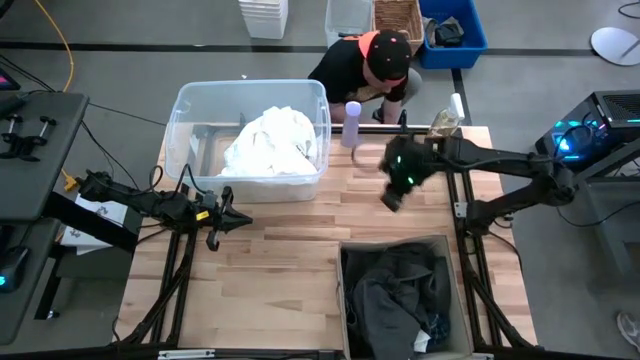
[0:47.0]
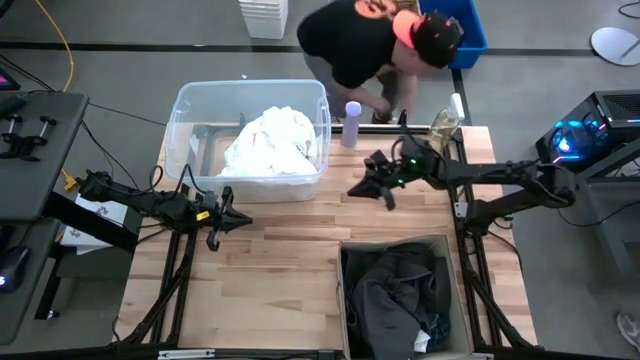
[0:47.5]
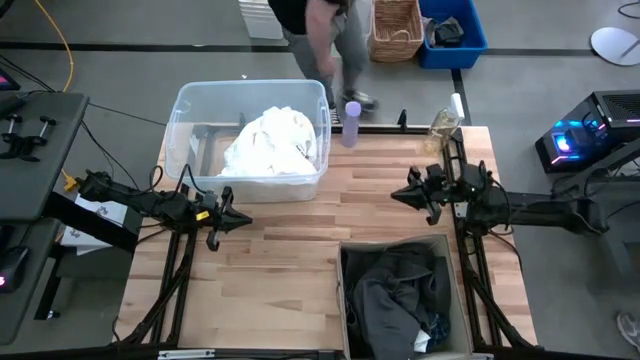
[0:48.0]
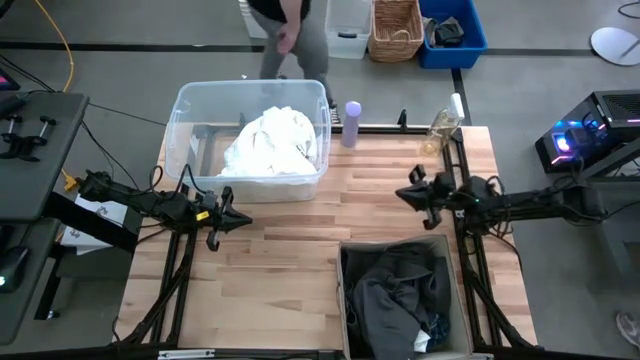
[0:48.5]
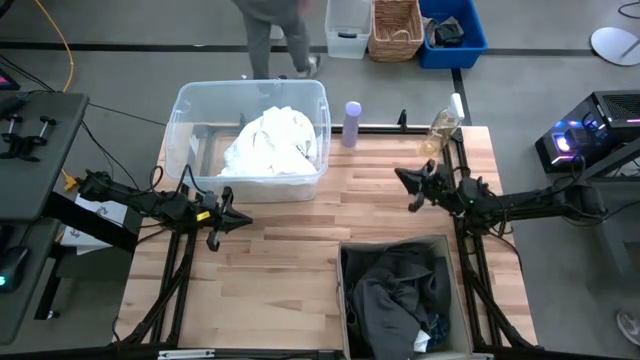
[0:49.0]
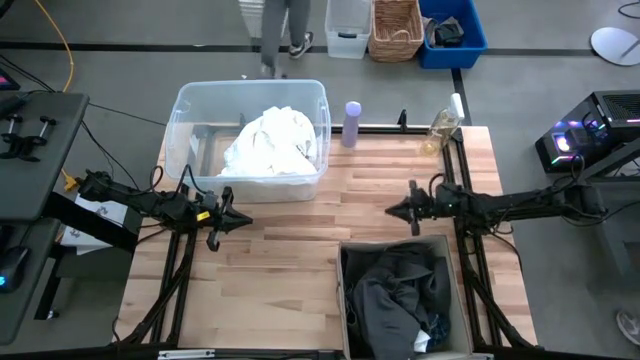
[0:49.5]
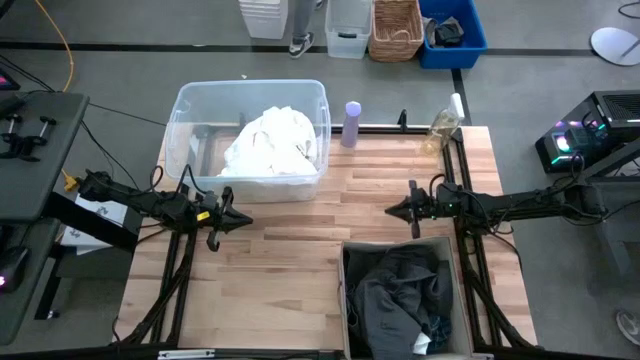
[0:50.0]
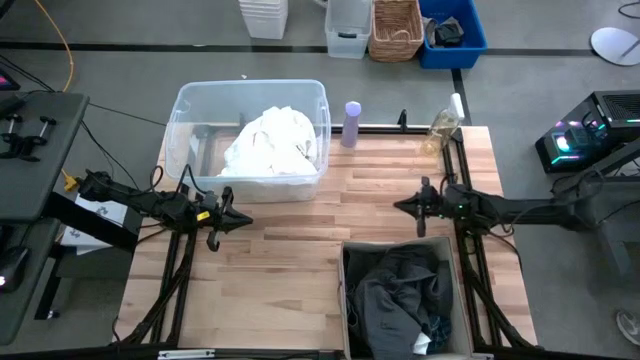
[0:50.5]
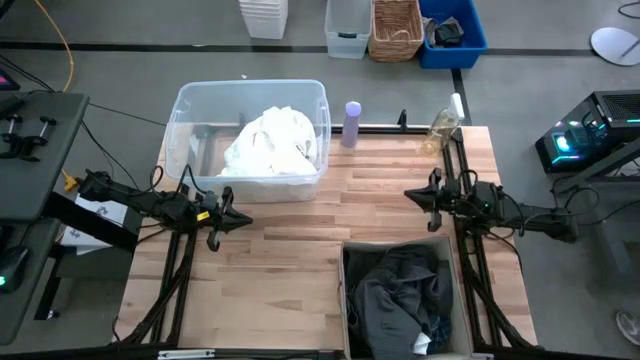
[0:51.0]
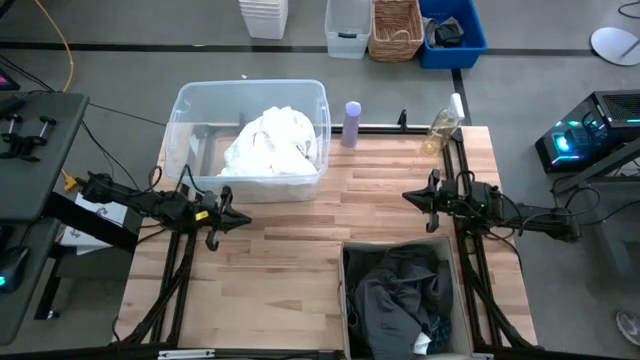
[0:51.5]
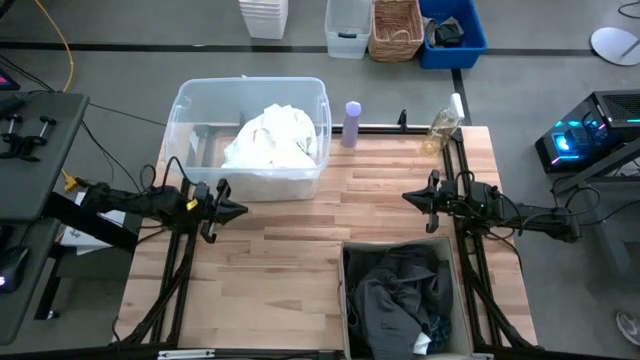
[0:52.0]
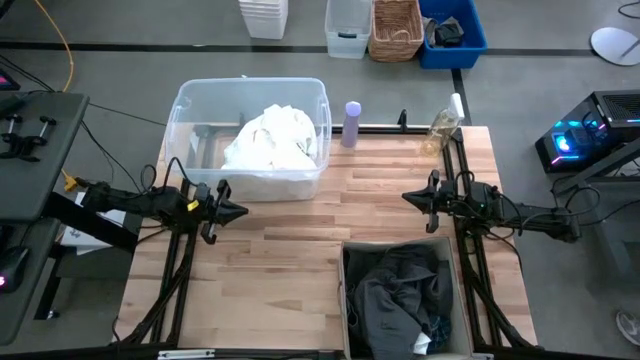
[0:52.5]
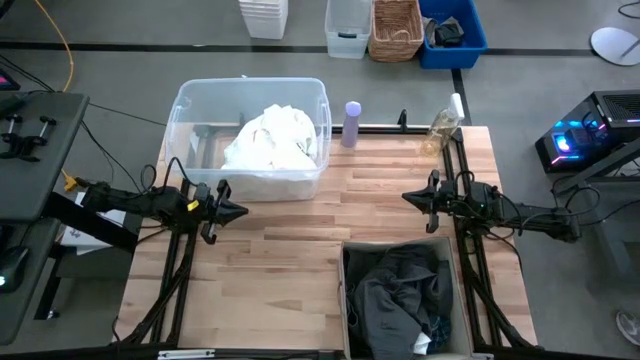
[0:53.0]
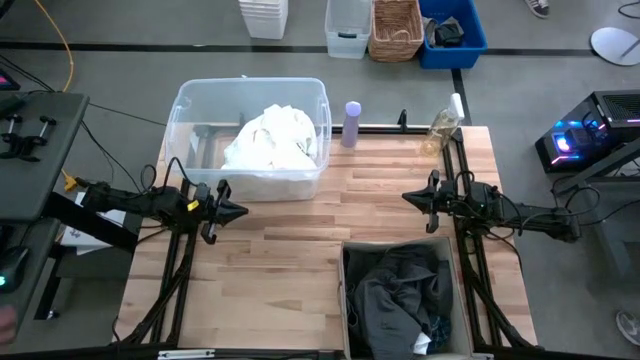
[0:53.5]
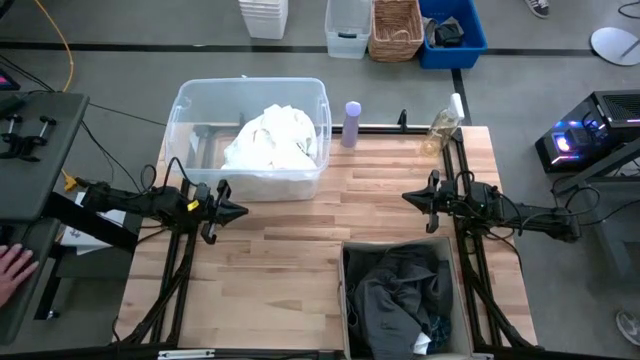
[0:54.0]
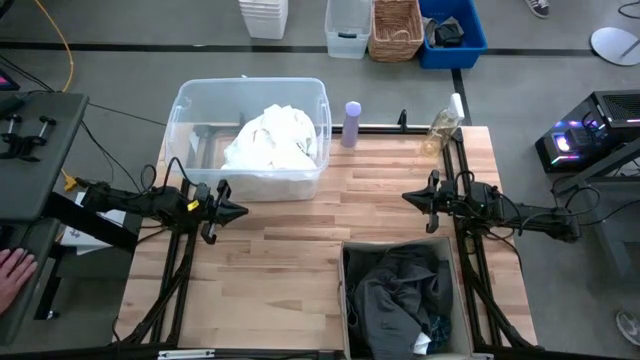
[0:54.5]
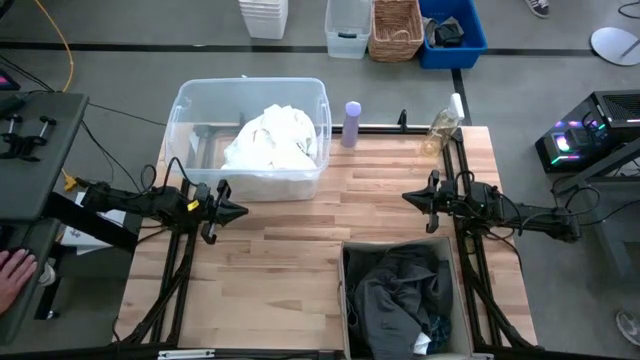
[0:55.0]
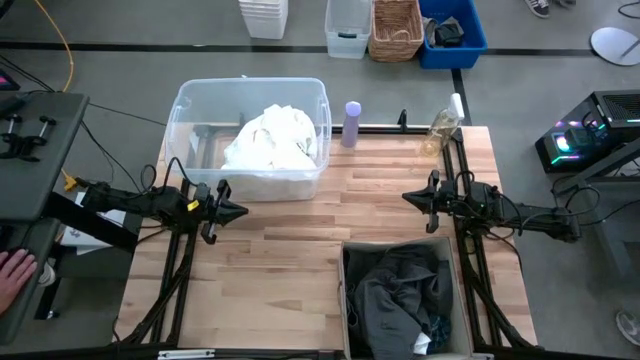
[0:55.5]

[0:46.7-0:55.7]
Task: Sort clothes
Return to Home Position

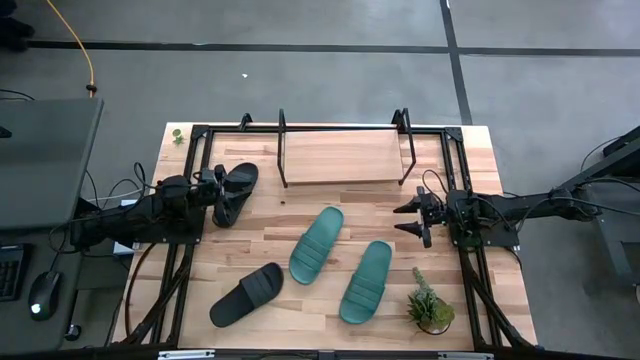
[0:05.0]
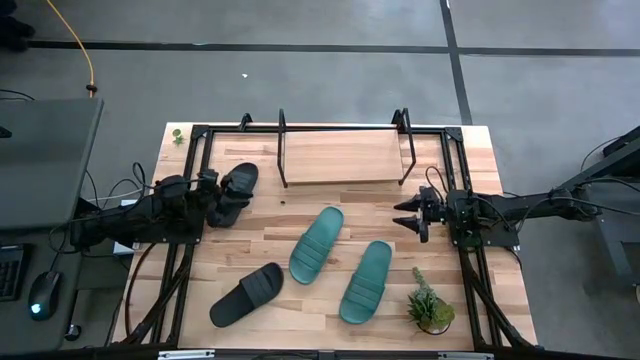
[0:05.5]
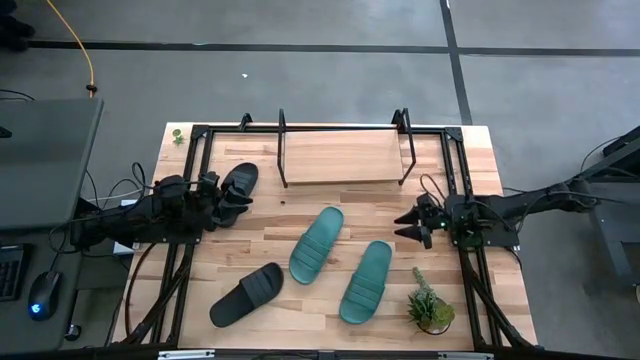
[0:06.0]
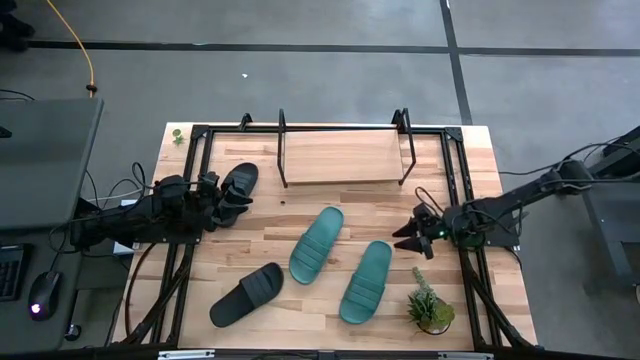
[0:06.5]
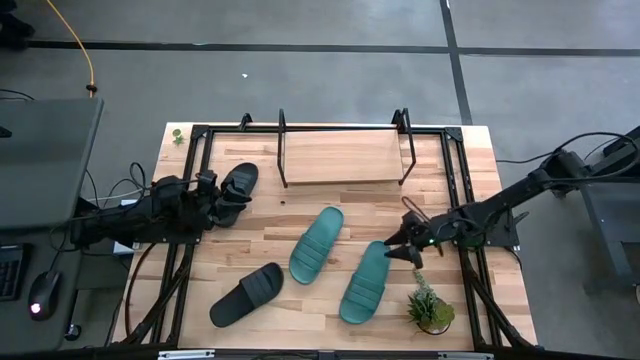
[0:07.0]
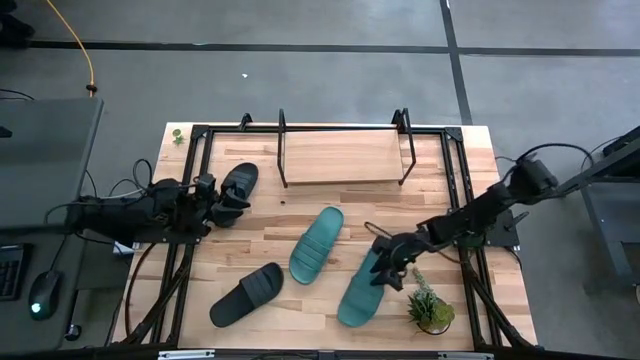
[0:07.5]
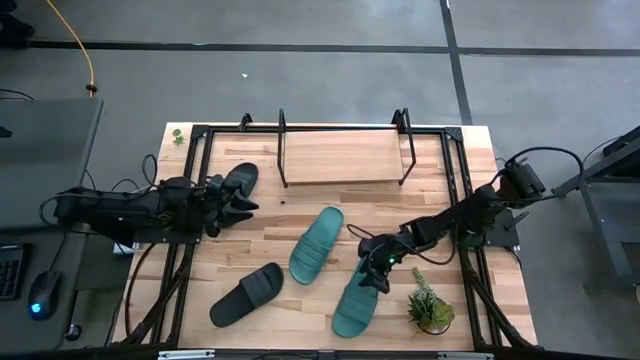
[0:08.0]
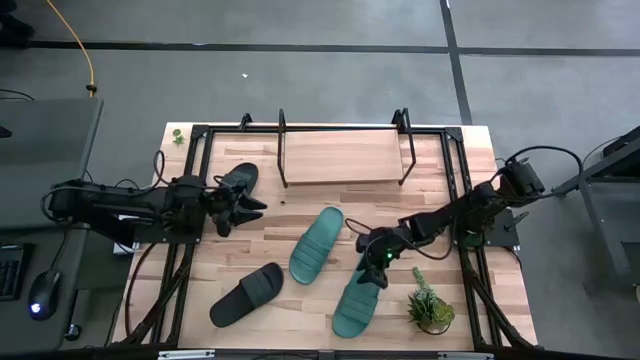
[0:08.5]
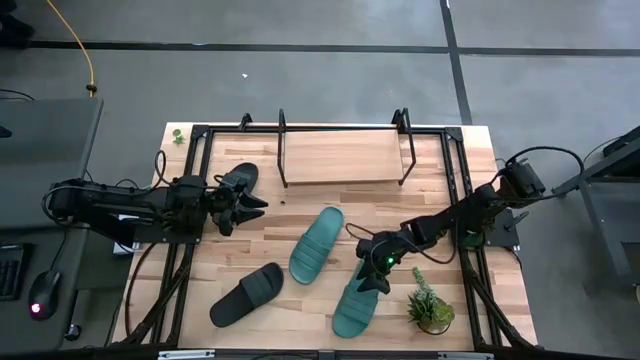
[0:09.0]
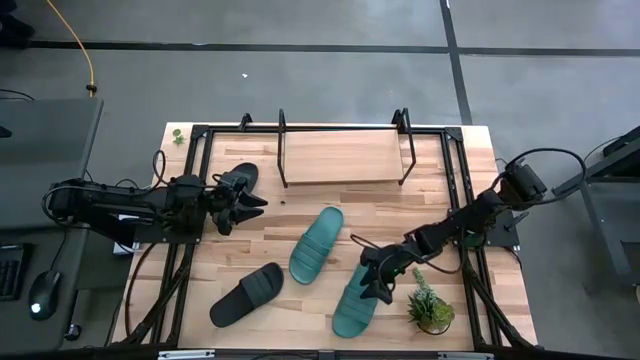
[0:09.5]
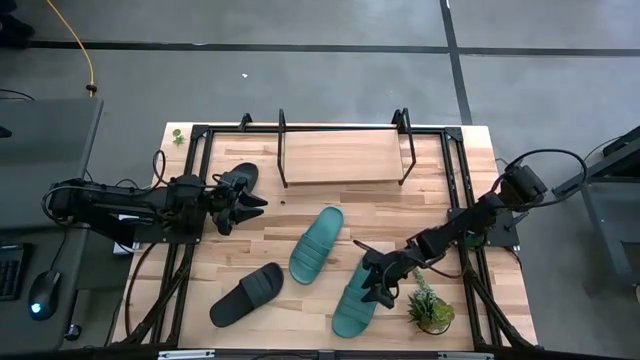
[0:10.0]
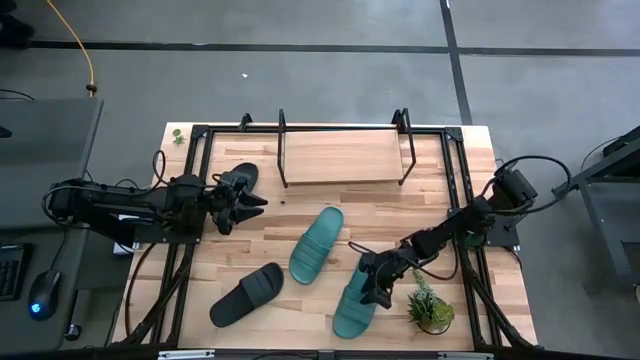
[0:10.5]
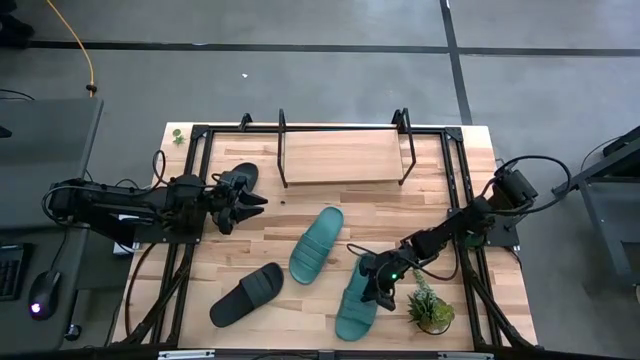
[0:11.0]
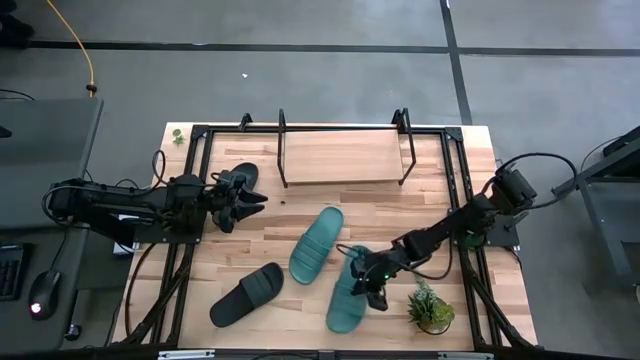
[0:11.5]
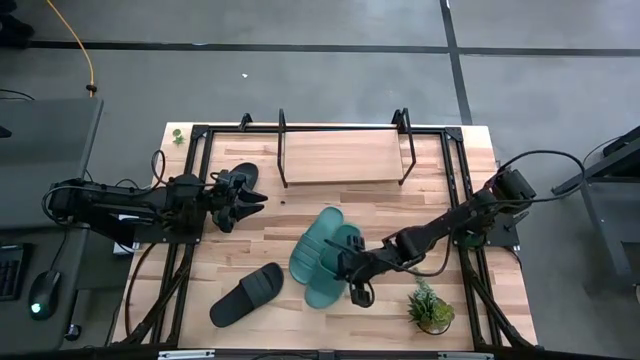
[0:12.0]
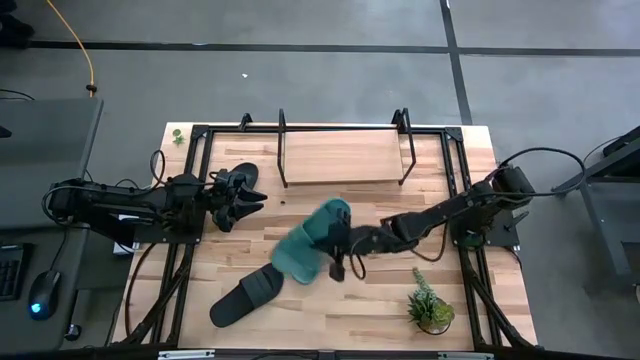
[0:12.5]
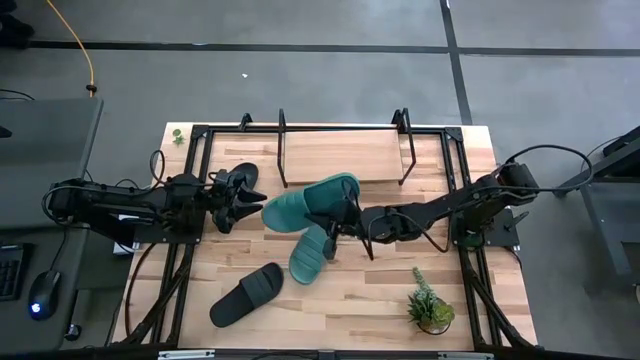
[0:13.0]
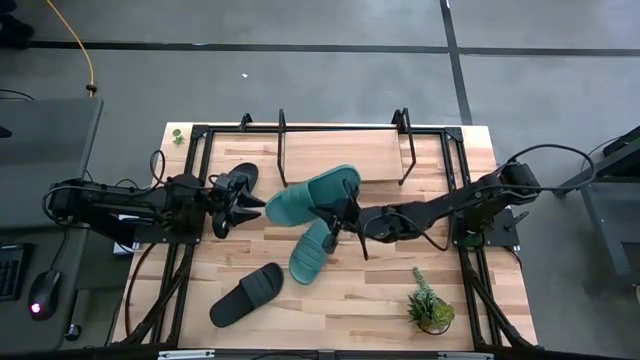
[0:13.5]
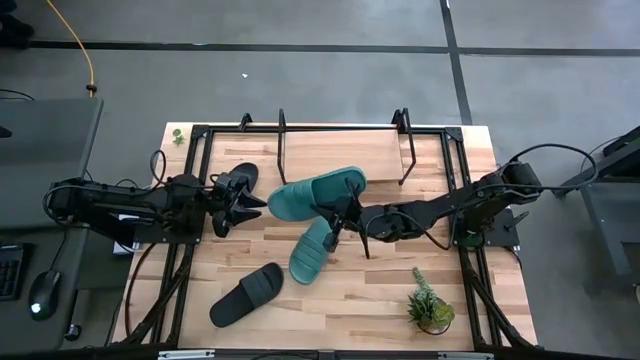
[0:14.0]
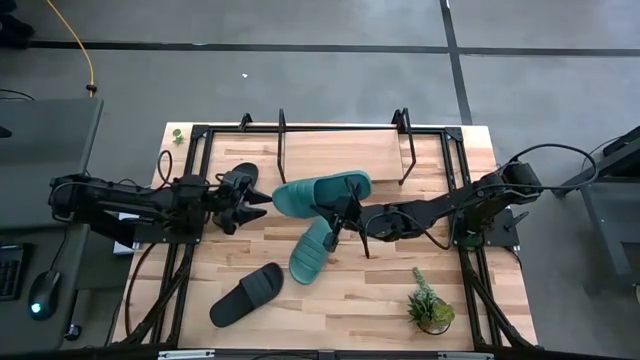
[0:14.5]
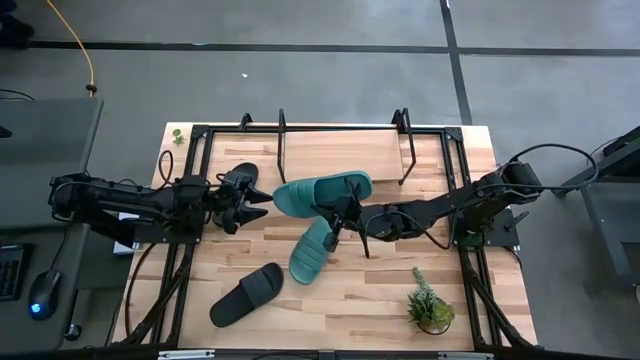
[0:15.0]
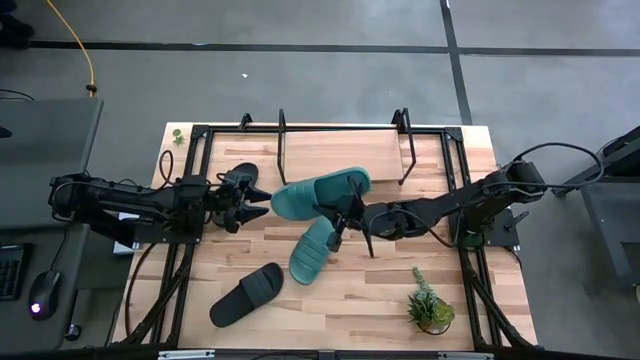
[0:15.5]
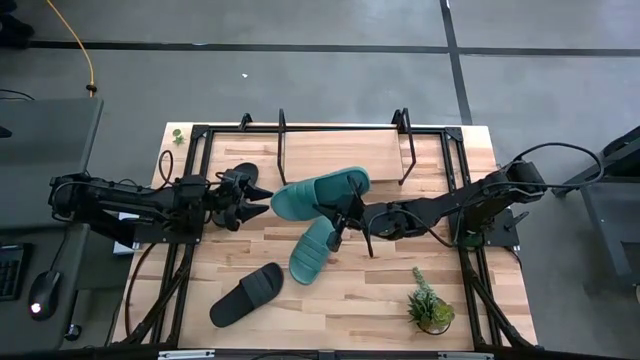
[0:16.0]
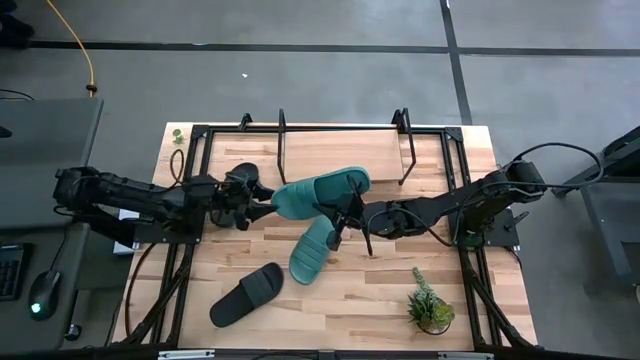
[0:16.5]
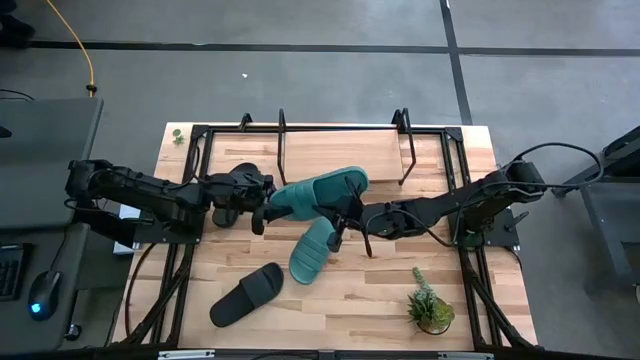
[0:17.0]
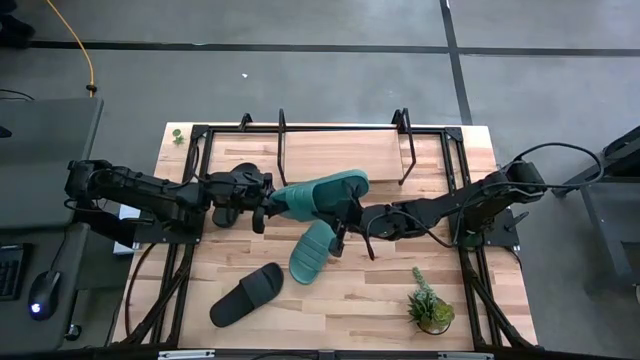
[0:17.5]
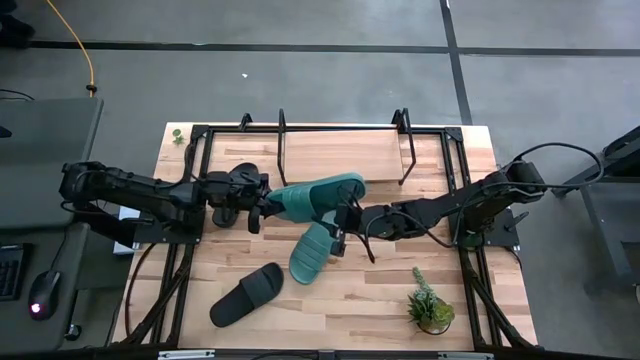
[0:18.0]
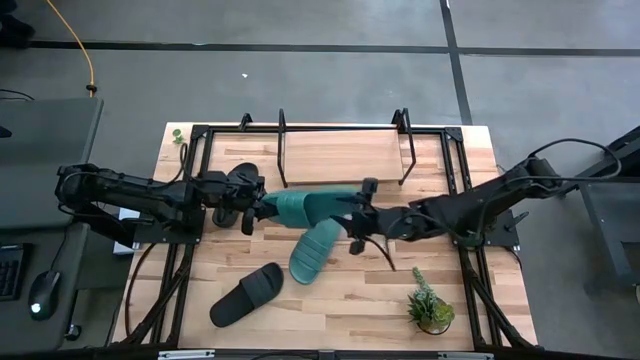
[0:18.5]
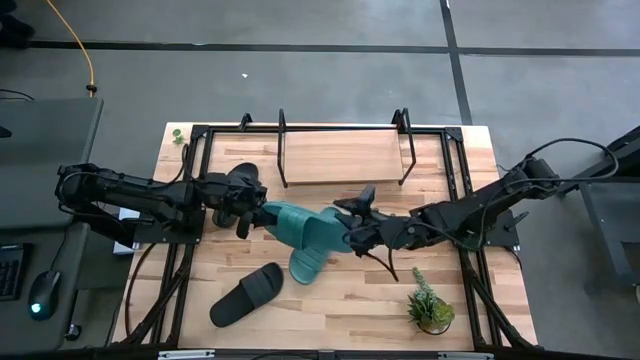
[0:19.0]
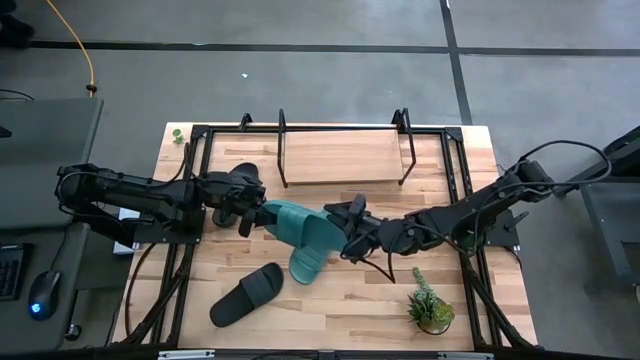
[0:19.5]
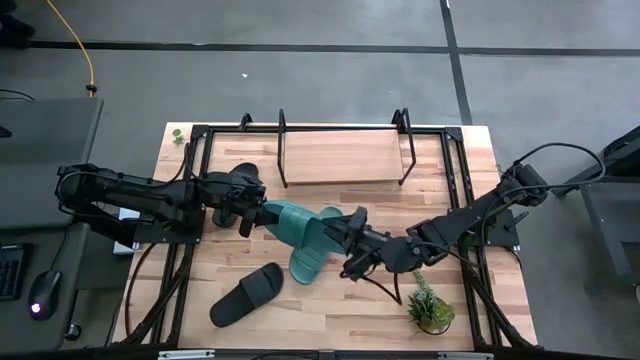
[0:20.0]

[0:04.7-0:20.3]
Task: Pick and place slides into the shelf
Put the bottom green slipper on the shelf
